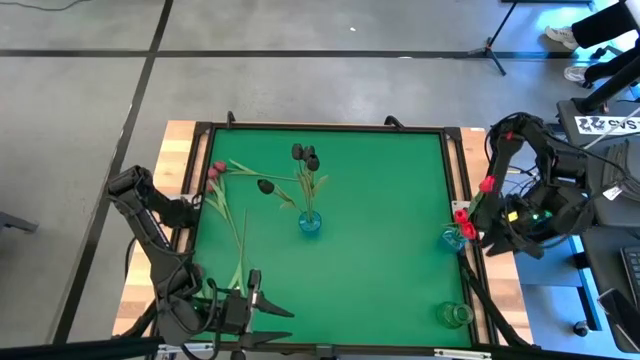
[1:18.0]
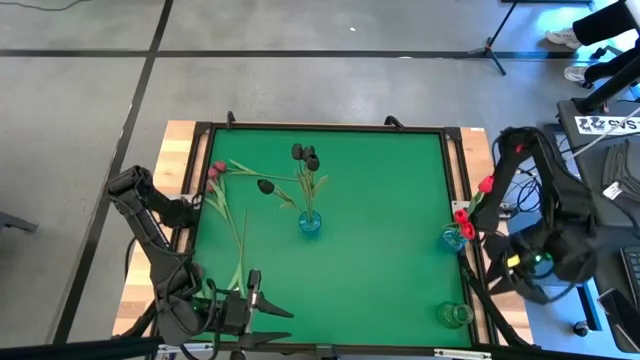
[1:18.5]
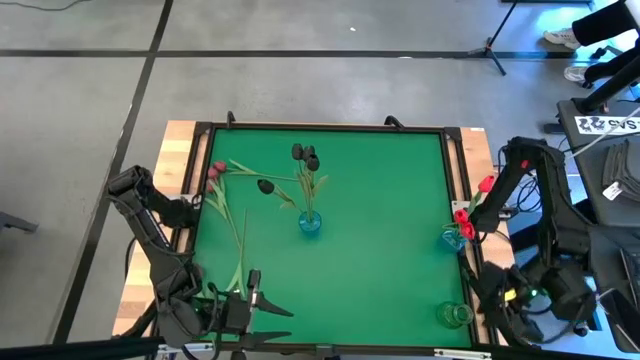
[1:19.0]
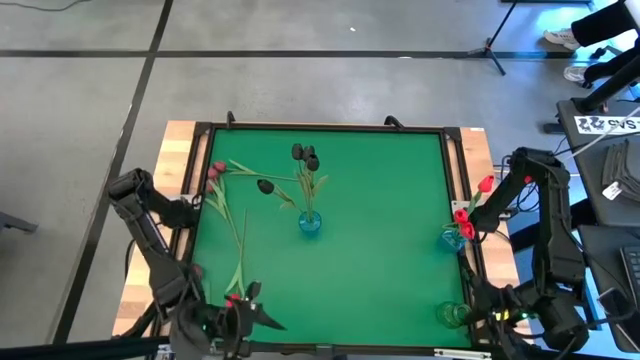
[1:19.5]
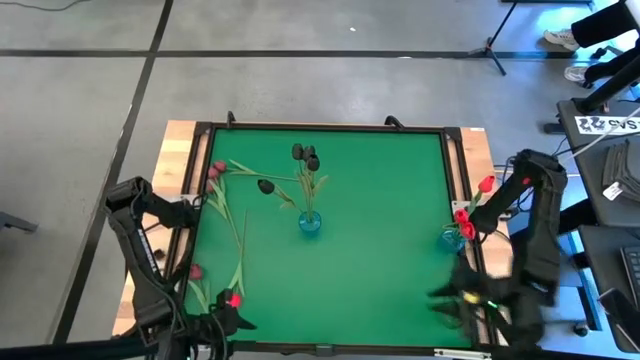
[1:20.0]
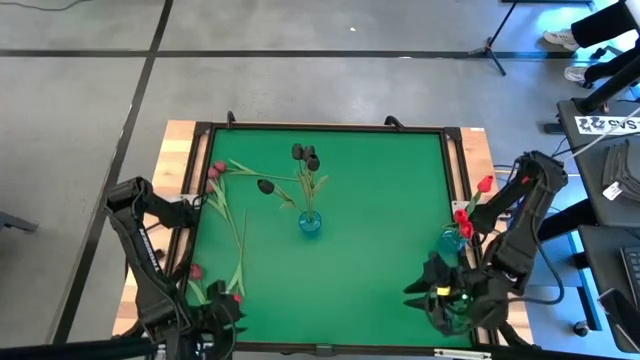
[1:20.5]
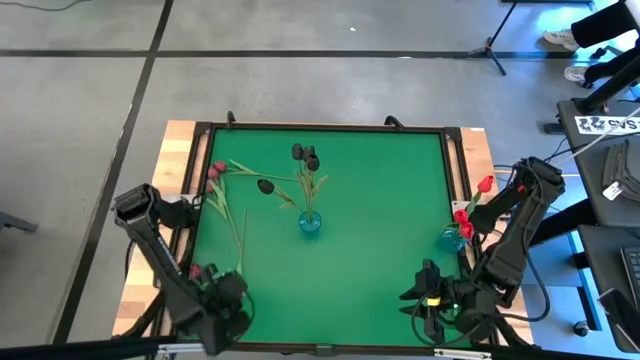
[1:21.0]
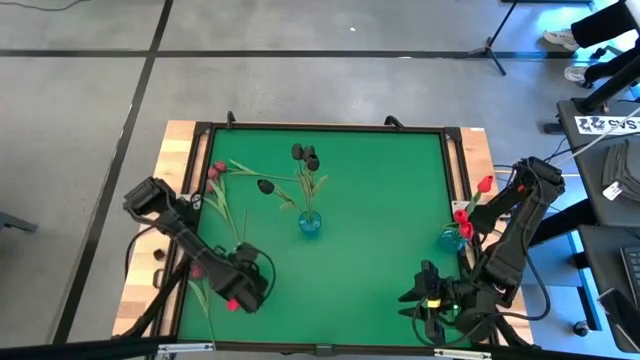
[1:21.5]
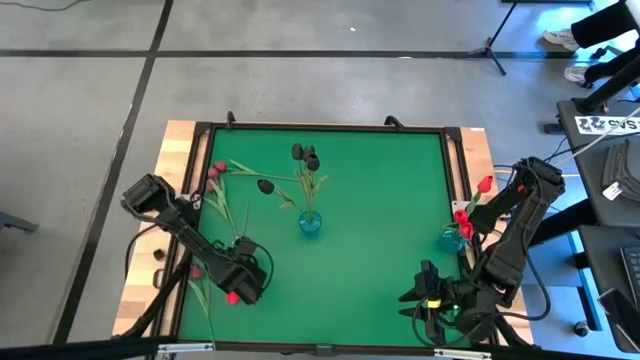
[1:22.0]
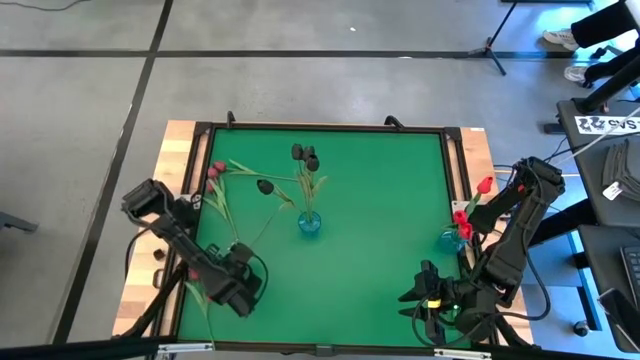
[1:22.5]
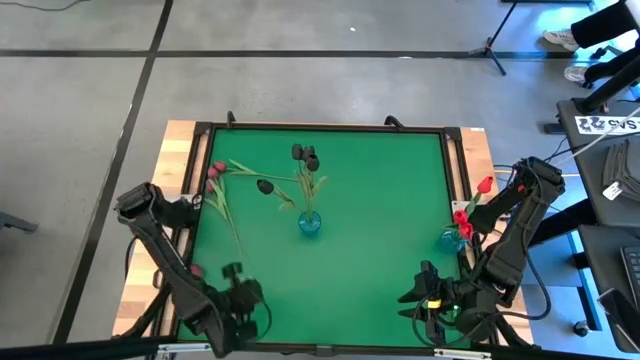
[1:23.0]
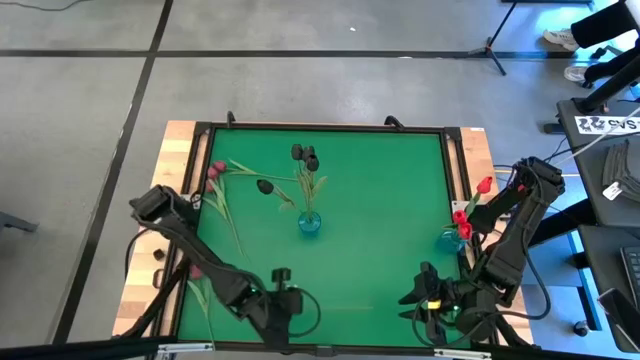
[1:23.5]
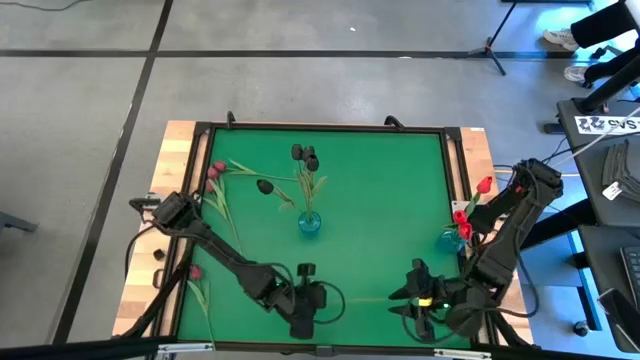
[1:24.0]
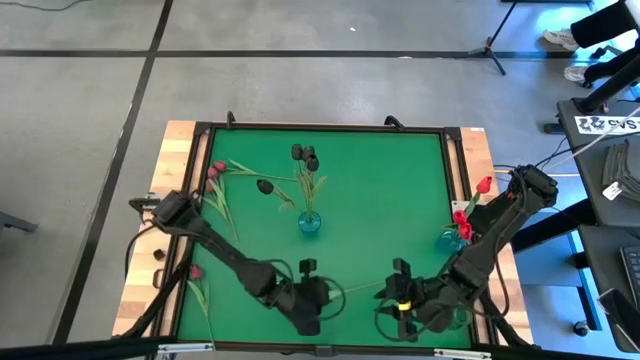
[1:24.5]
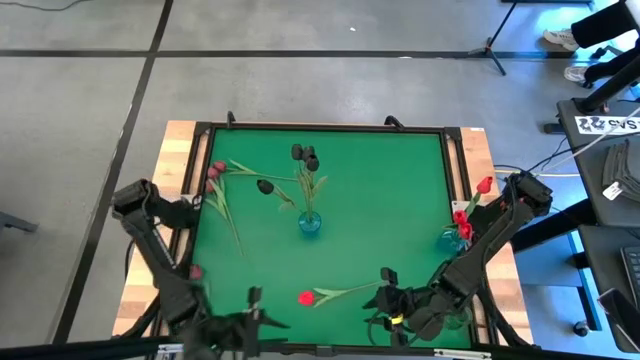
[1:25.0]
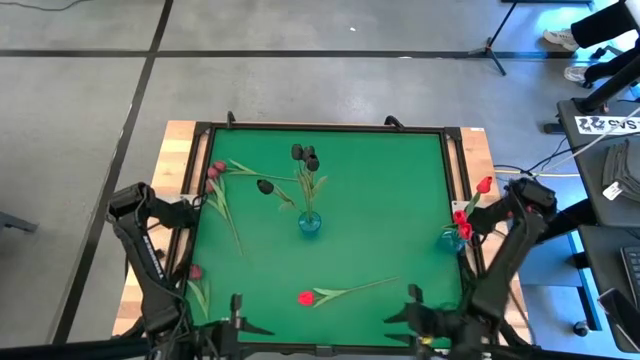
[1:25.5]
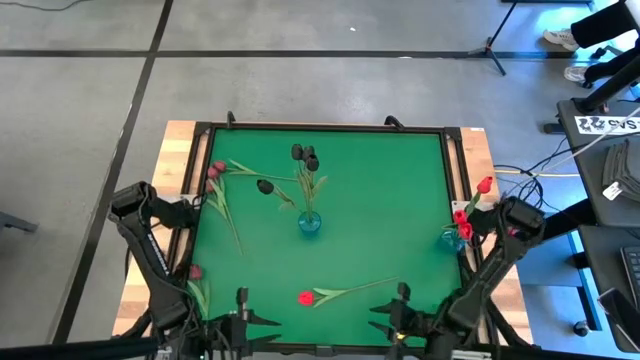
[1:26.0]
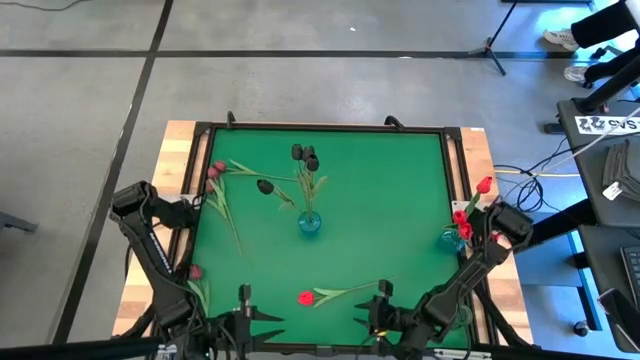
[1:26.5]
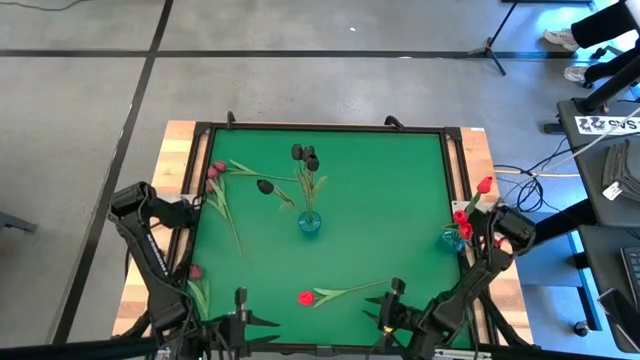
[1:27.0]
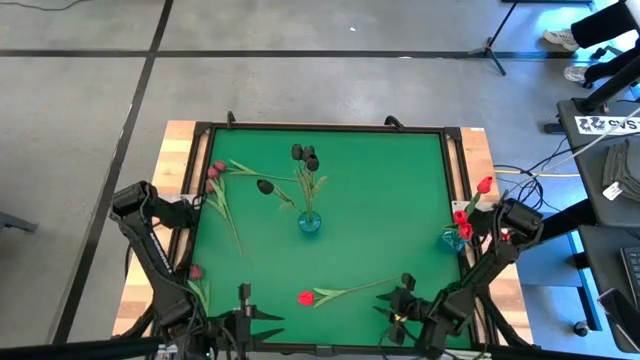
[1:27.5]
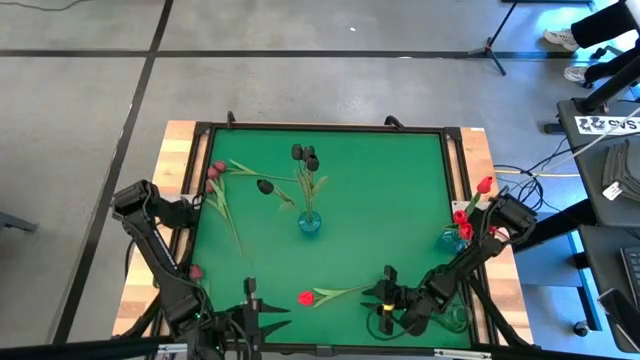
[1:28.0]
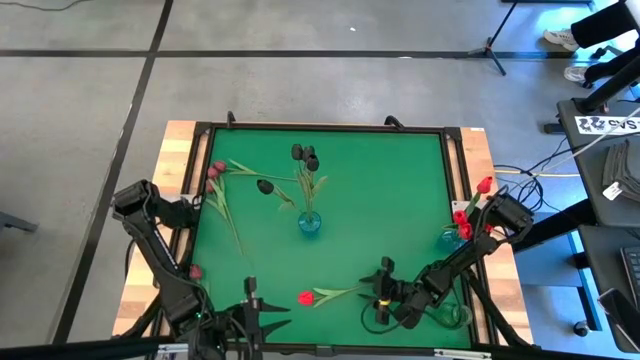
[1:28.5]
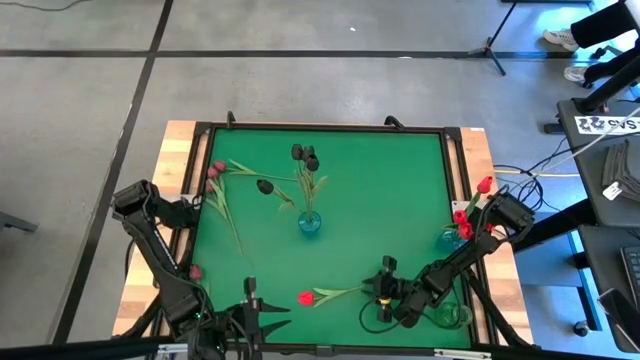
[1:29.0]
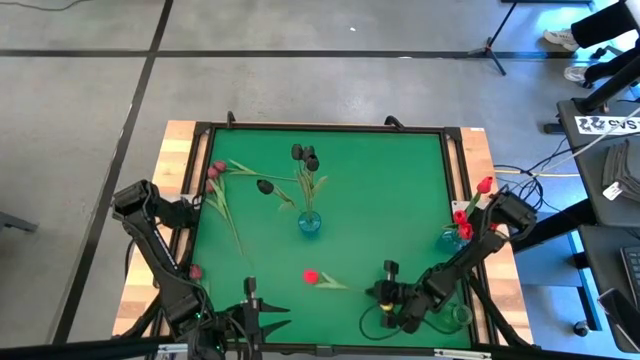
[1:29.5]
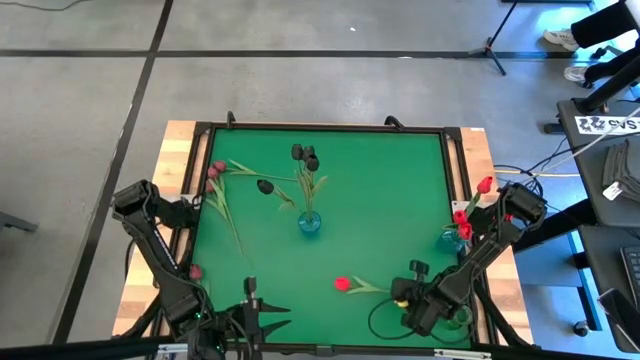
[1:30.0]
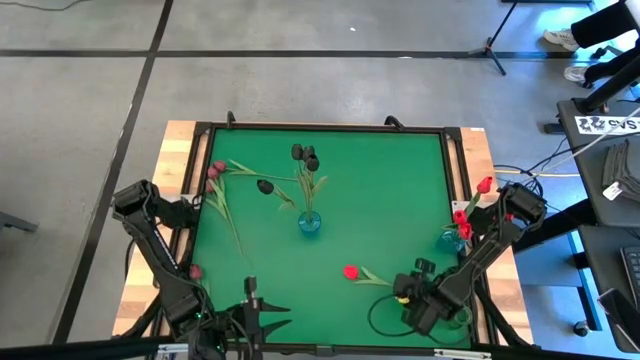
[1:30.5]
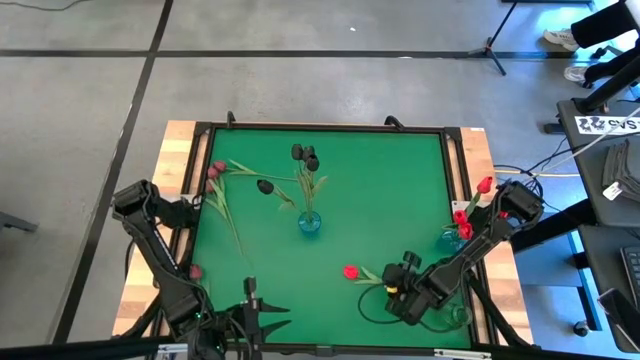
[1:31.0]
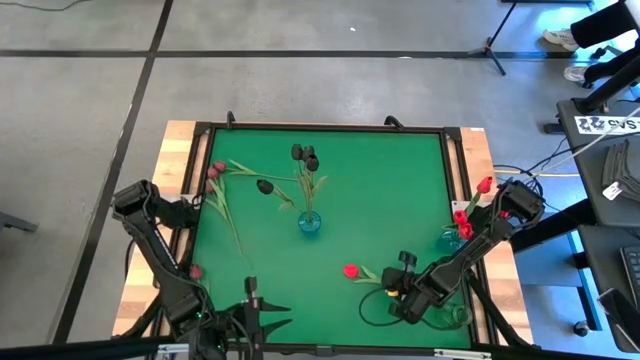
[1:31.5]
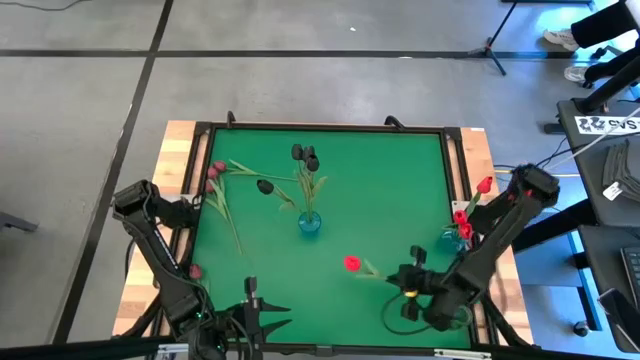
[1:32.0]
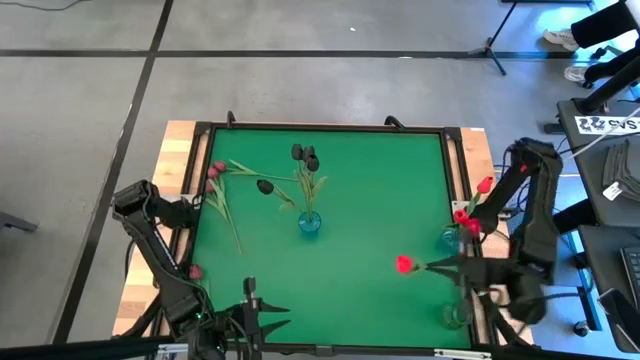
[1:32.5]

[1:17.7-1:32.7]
Task: Sort flowers into vase by color
Put the red flower into the right blue vase

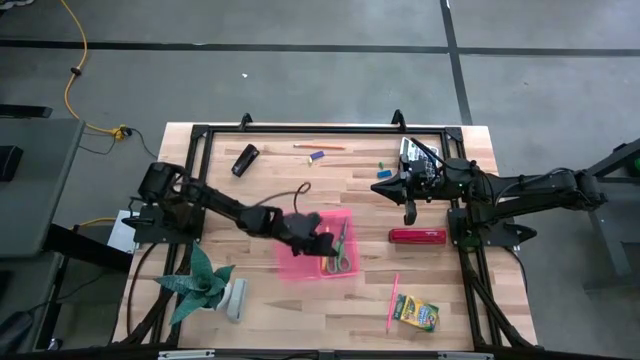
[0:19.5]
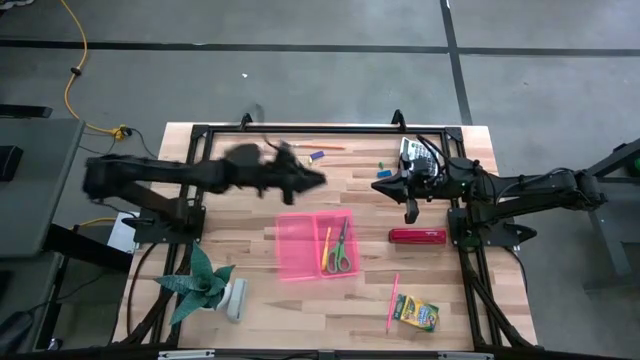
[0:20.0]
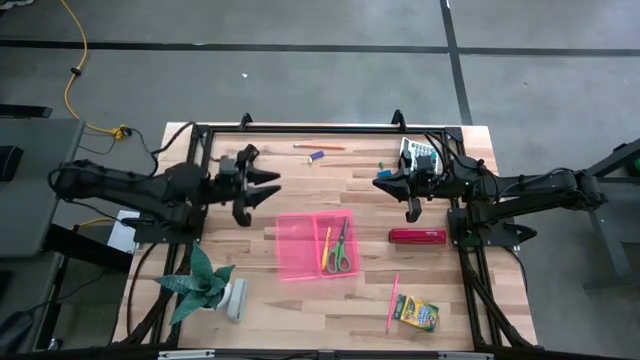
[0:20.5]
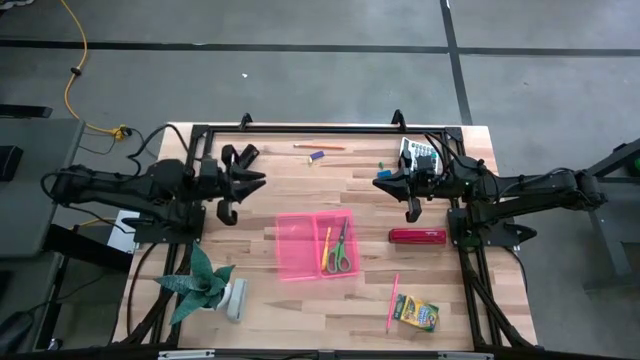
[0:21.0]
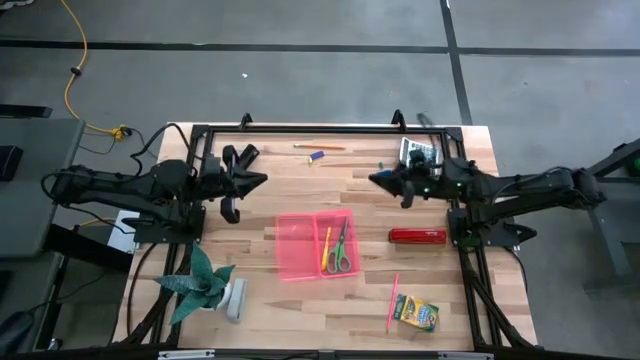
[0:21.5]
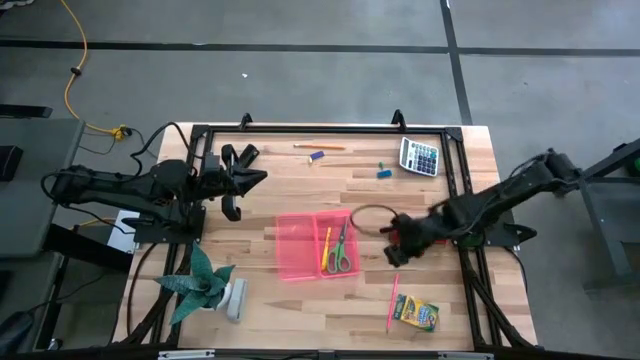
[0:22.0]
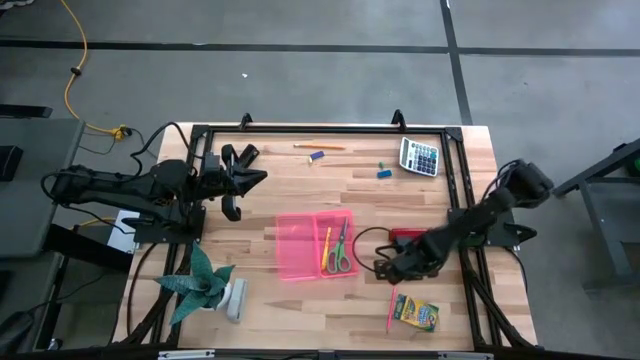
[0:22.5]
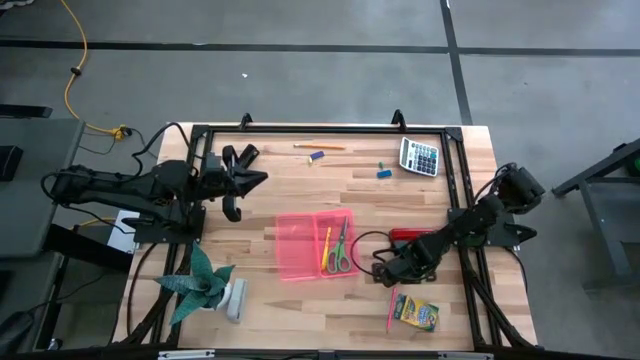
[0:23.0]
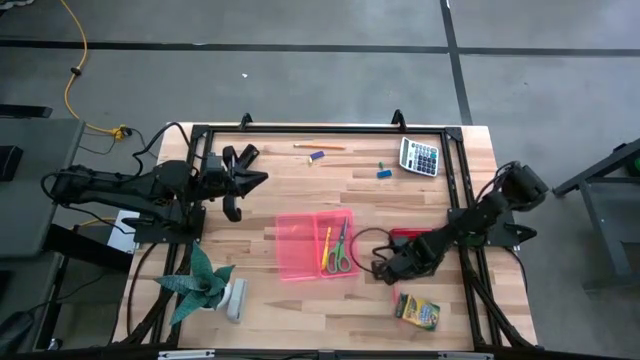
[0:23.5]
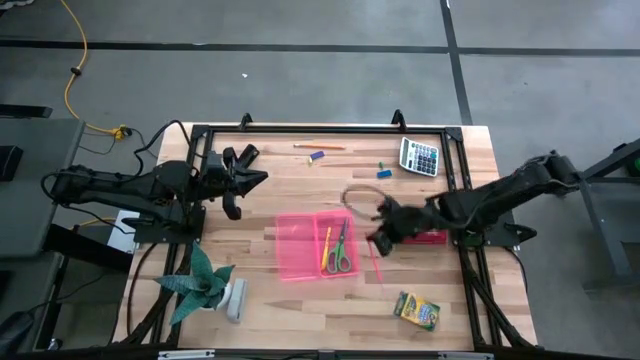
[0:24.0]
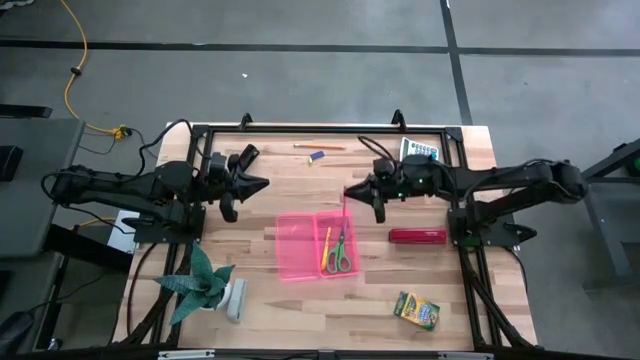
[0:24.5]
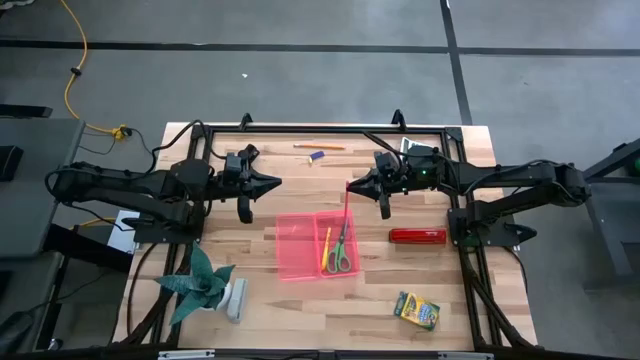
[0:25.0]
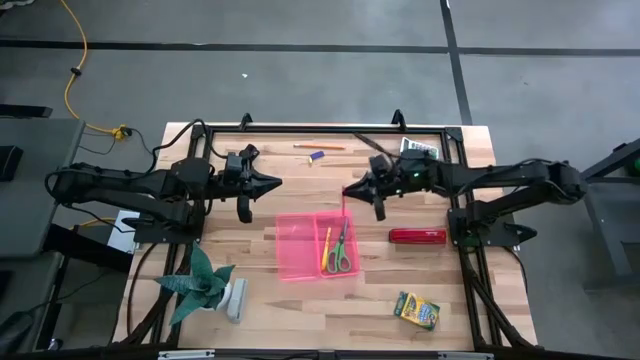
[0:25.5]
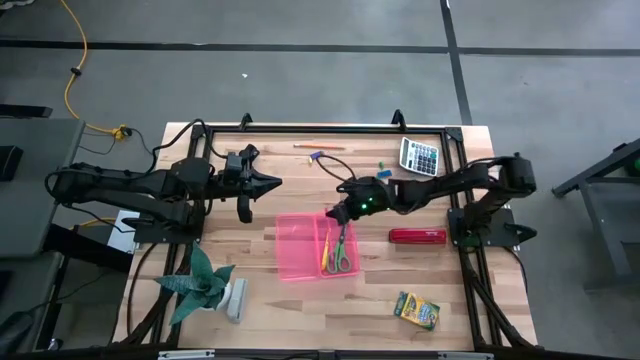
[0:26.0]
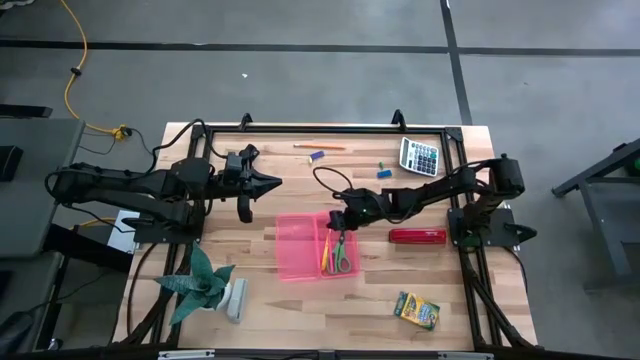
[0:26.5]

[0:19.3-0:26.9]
Task: Pack school essentials
Put the pink pencil into the pink supply box
